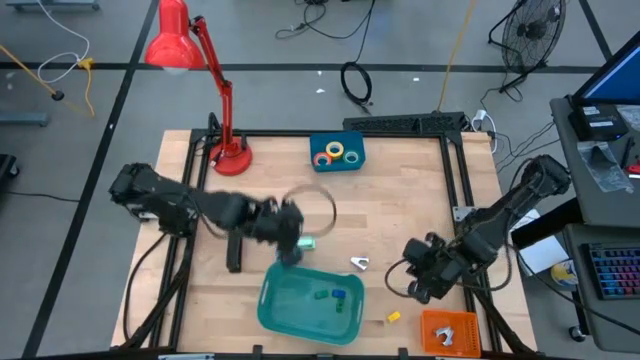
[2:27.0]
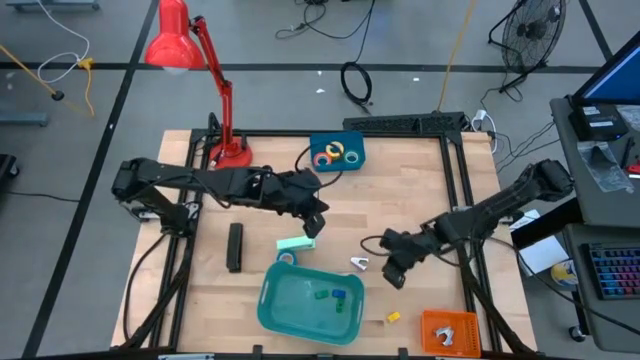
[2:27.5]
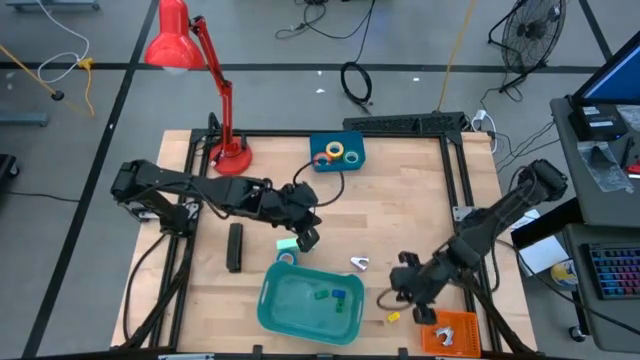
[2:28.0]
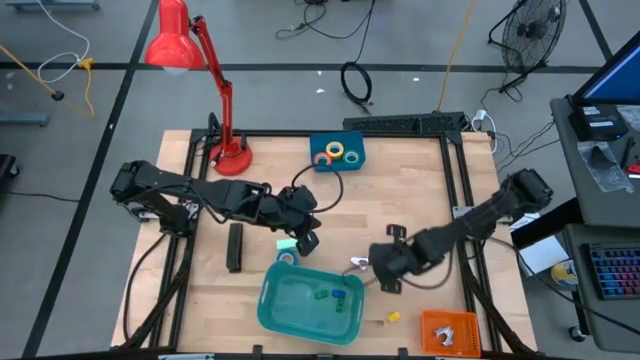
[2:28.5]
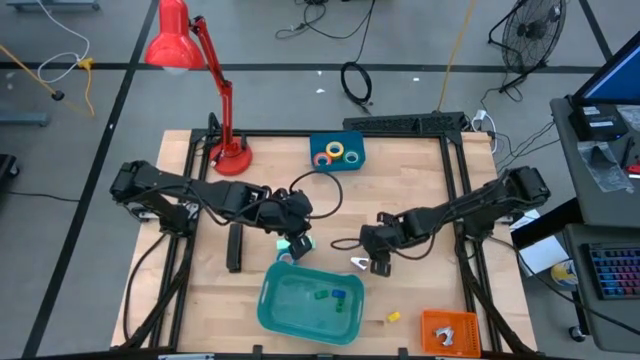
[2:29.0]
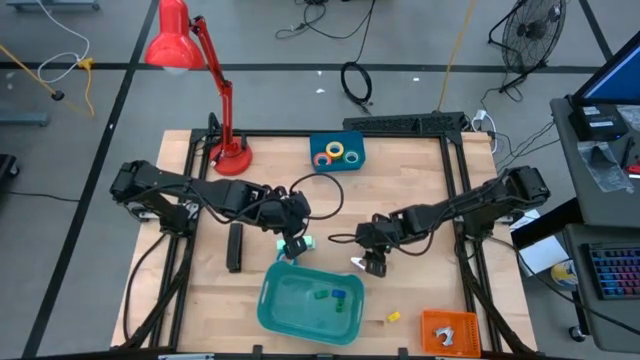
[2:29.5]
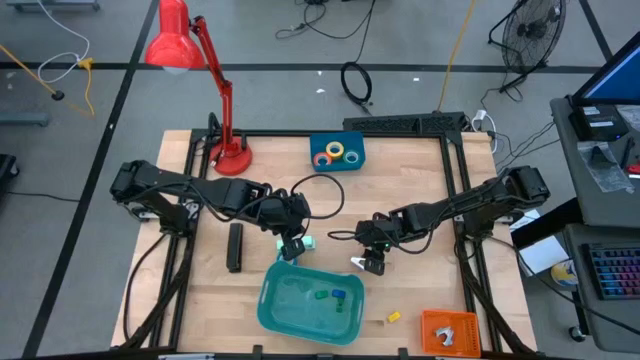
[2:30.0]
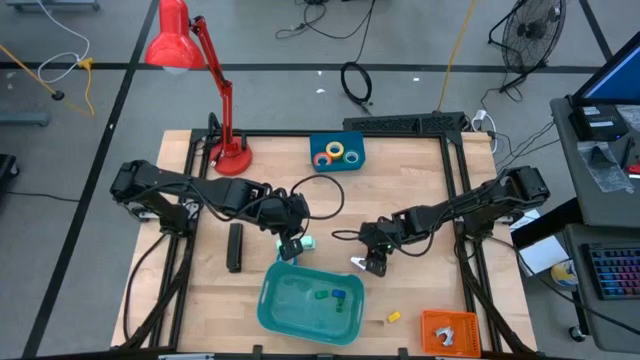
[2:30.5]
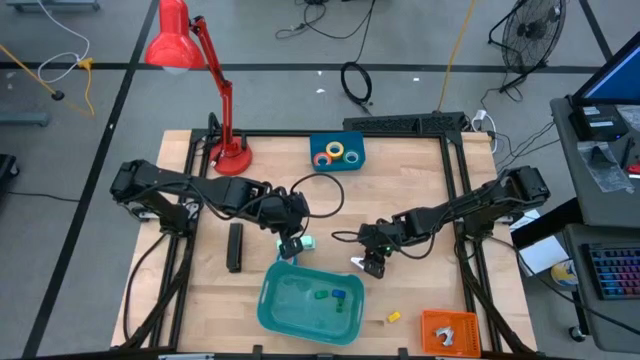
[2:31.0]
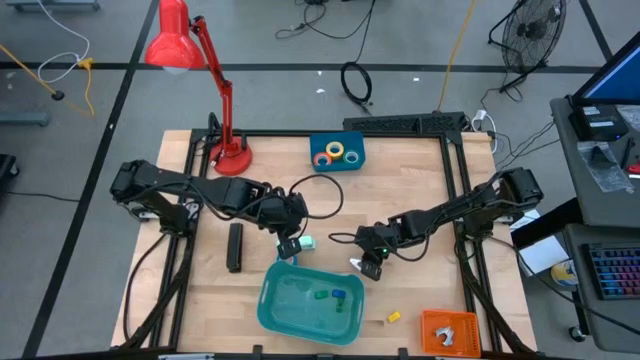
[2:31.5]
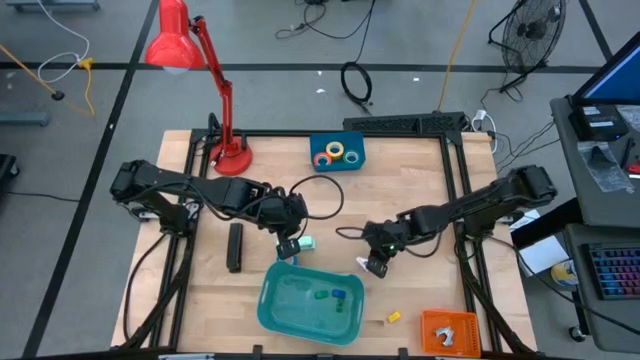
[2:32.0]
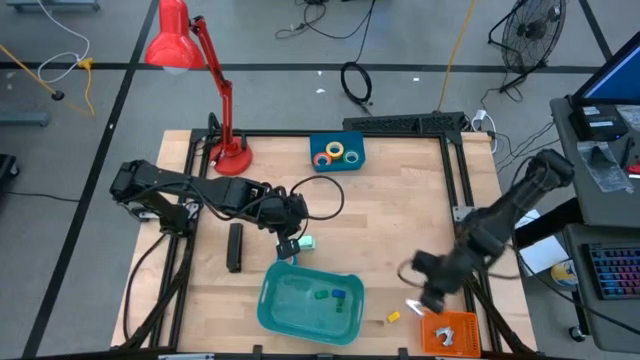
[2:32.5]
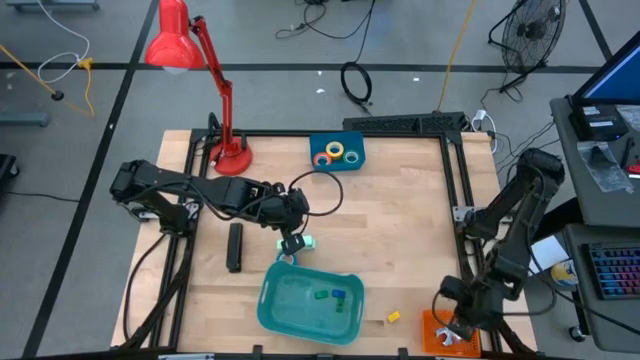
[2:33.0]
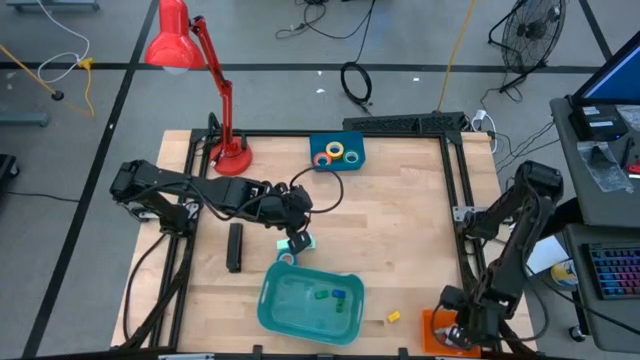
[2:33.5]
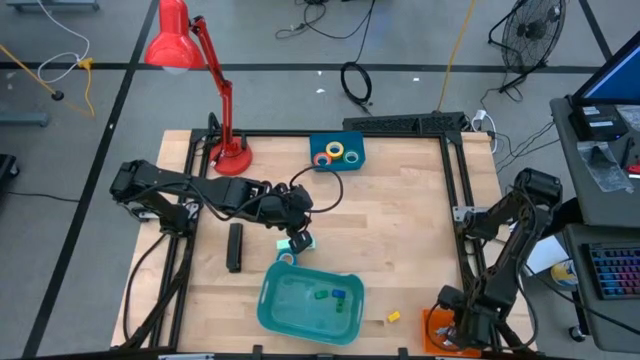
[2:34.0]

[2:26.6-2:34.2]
Task: Pick and place Stapler, Stapler remover, tape
Put the purple staple remover into the orange bin

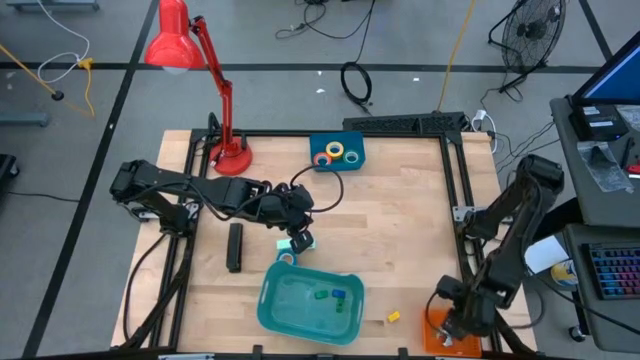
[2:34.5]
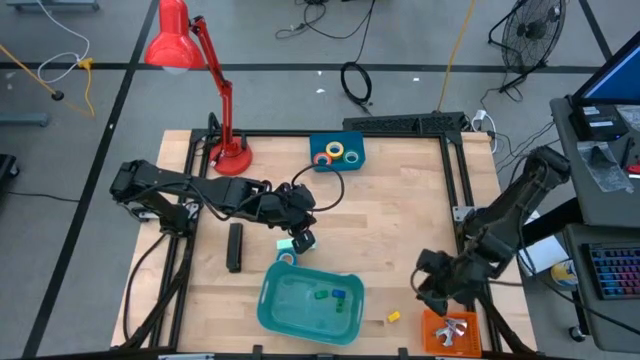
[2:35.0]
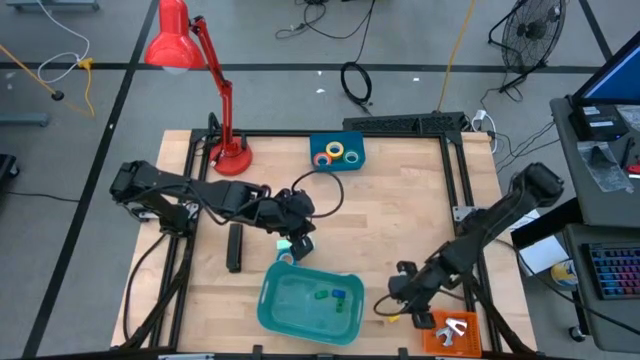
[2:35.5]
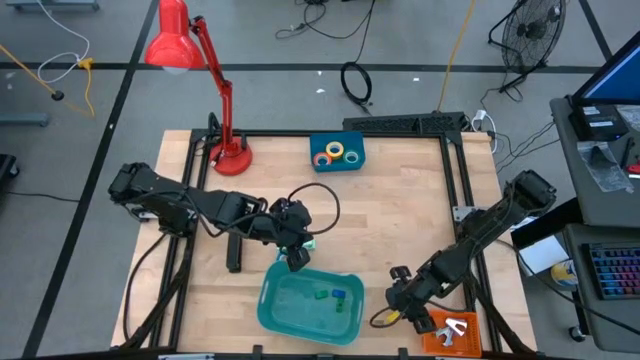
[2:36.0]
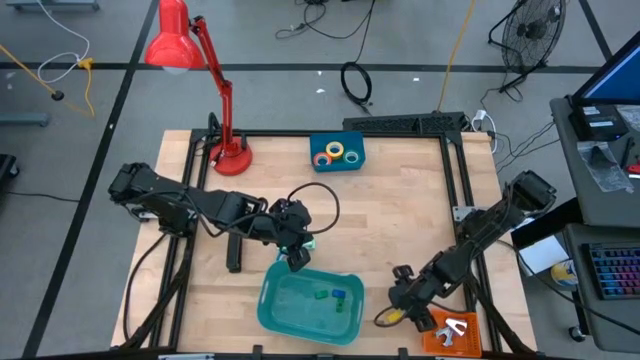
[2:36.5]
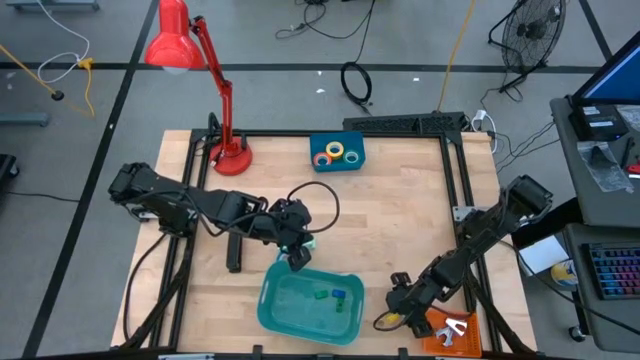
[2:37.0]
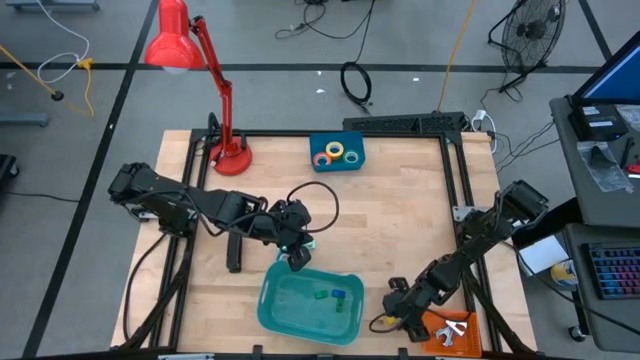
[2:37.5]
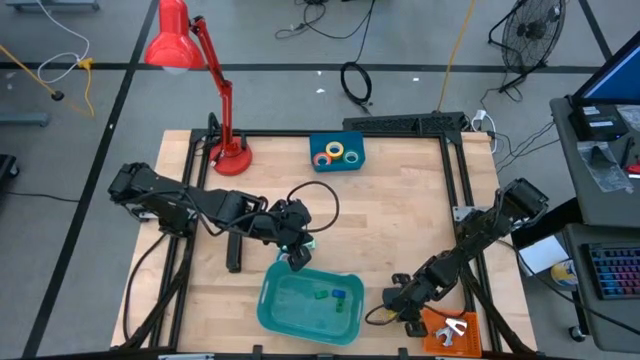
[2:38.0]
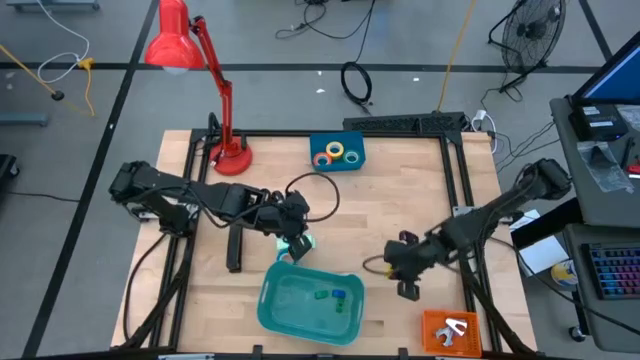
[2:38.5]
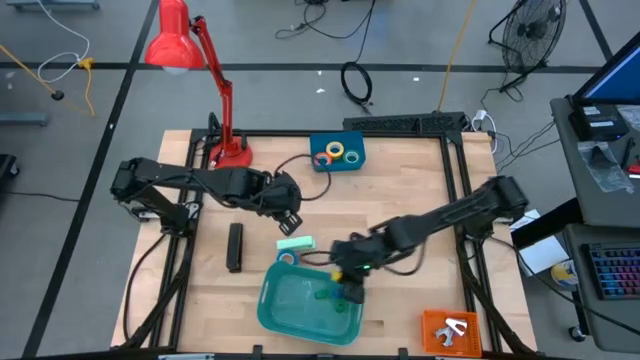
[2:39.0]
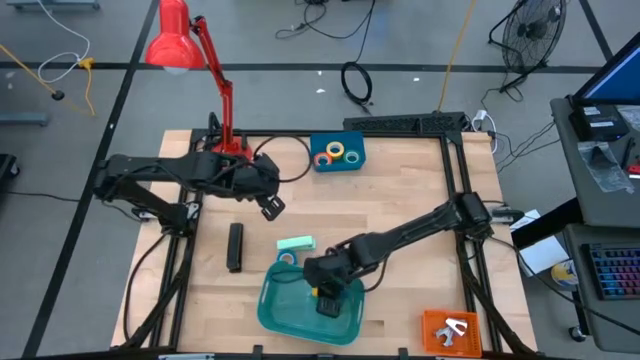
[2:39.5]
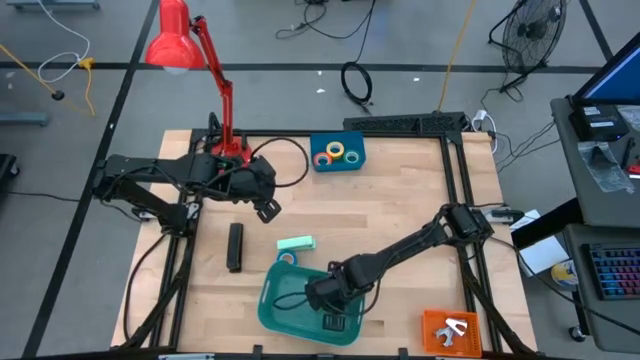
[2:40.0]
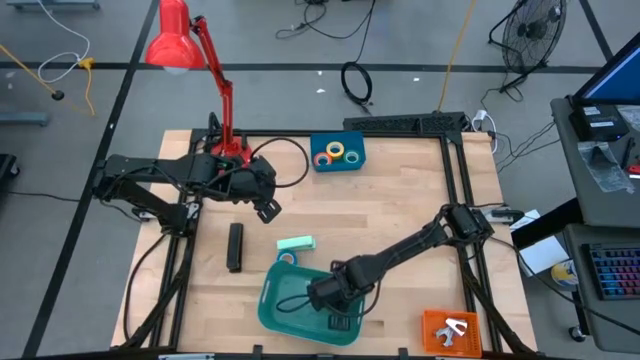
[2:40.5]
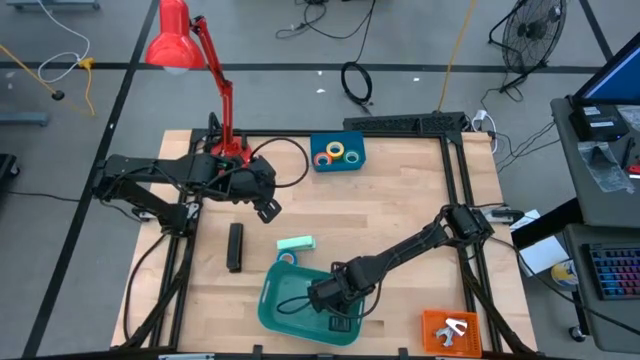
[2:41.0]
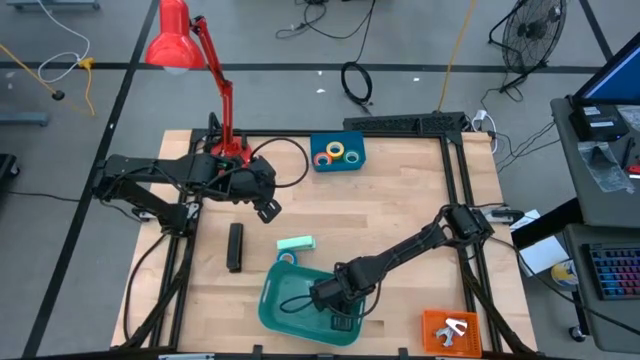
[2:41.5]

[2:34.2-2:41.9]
Put the yellow stapler into the green bin

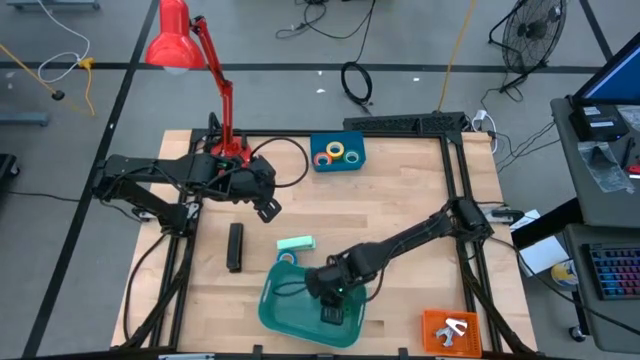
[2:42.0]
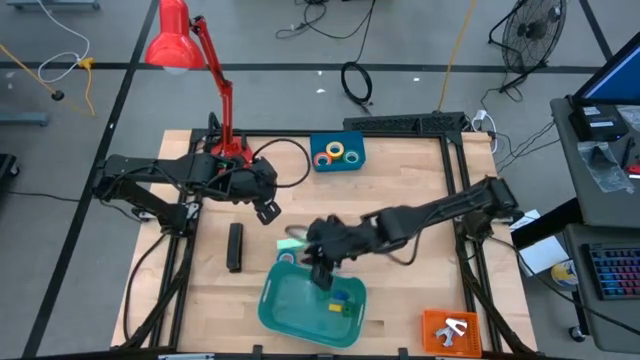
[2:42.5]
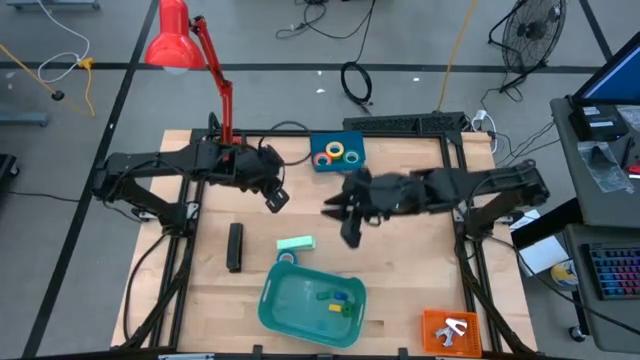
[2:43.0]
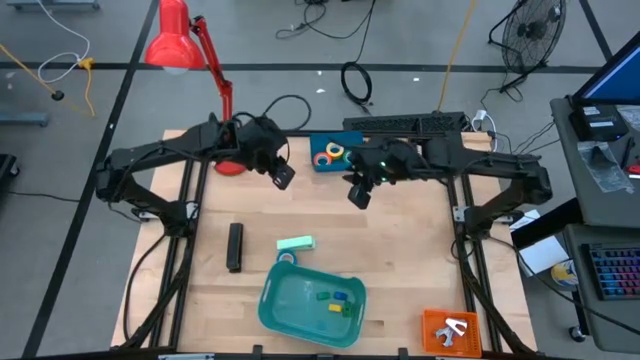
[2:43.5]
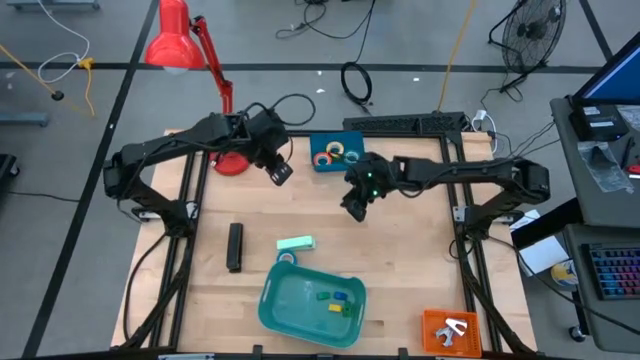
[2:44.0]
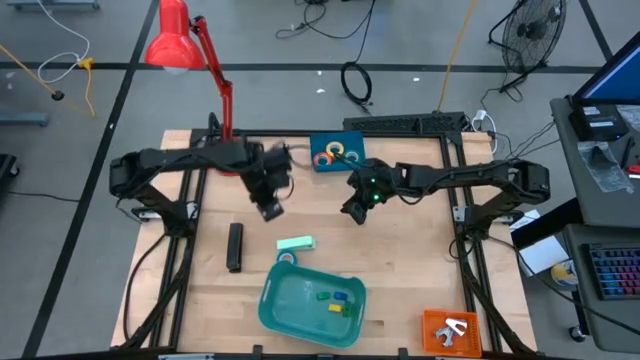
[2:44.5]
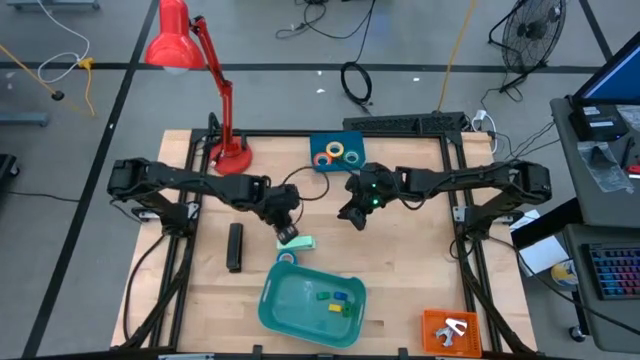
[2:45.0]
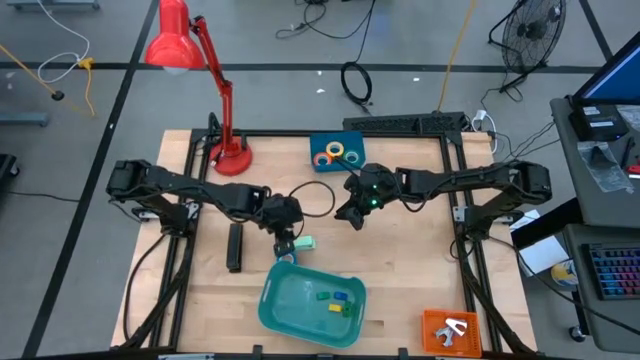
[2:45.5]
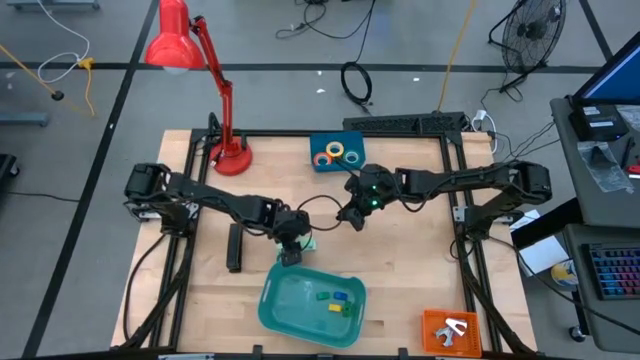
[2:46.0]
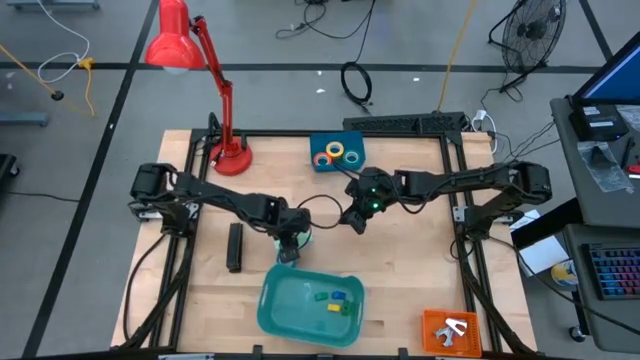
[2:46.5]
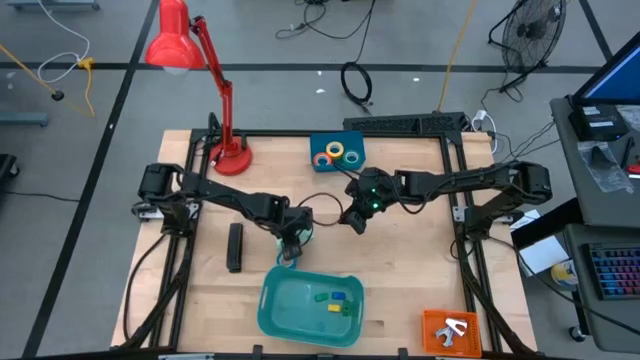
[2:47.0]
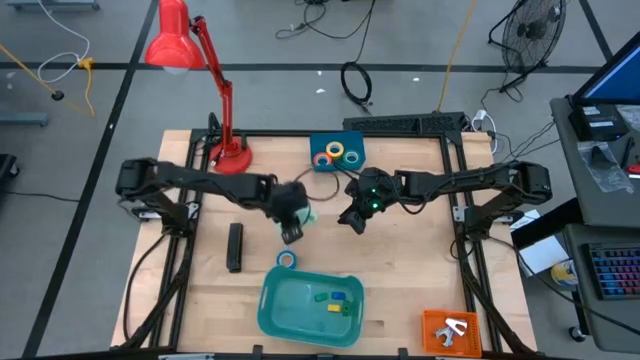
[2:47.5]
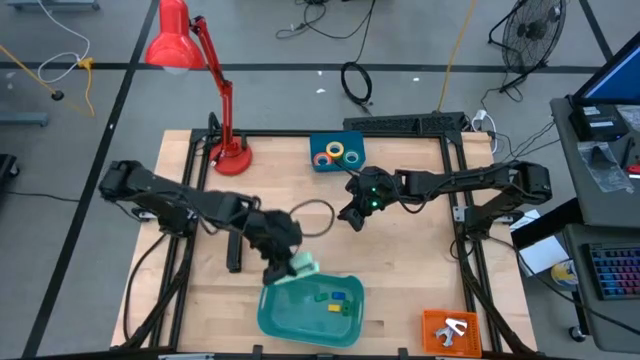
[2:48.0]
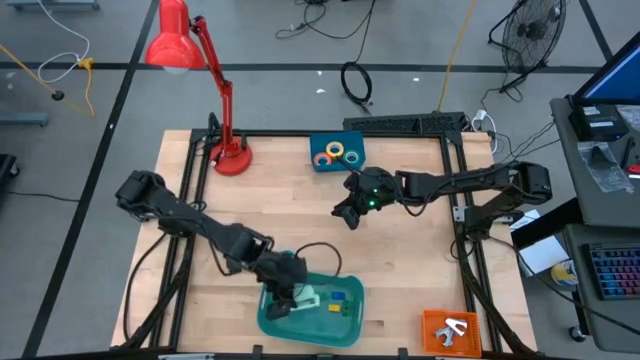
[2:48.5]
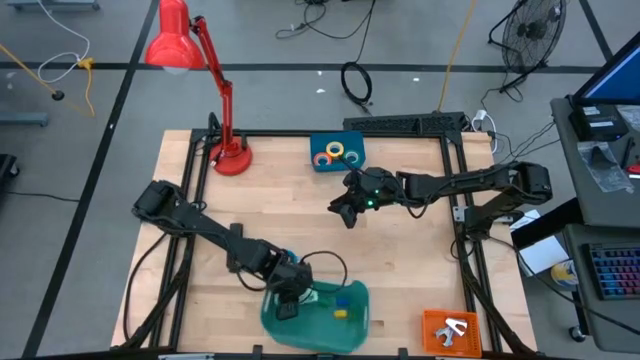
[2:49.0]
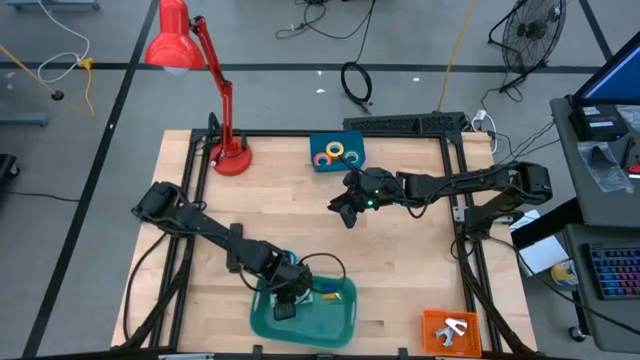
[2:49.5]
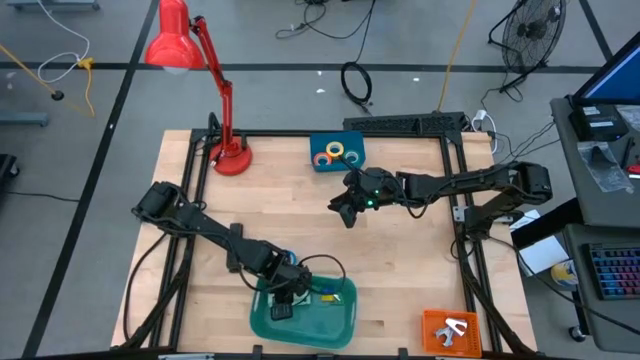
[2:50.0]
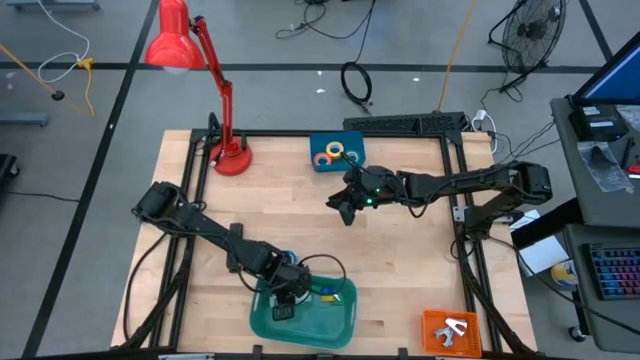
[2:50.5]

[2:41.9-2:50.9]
Put the light green stapler into the green bin
